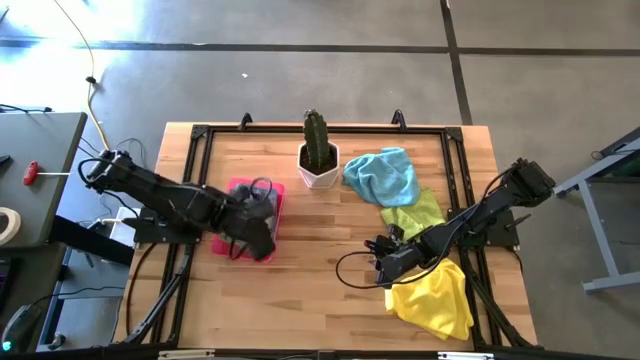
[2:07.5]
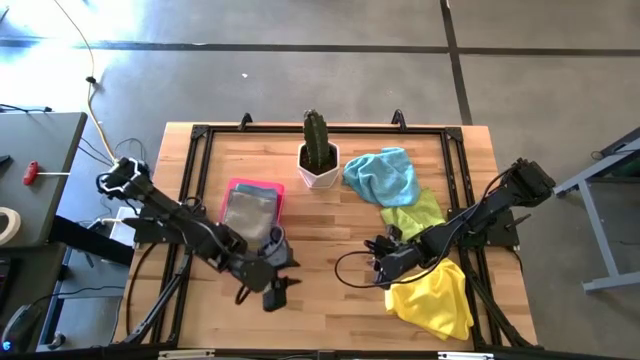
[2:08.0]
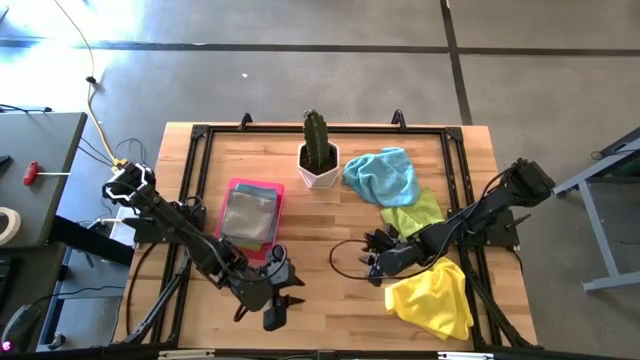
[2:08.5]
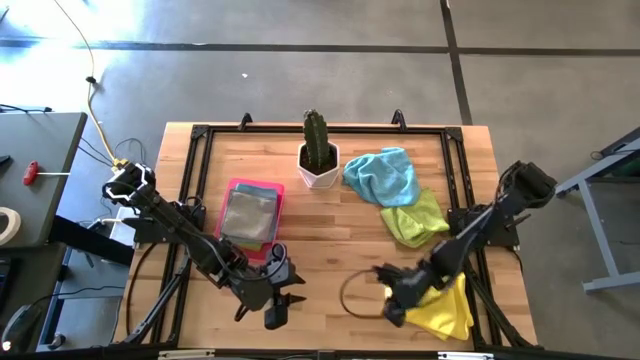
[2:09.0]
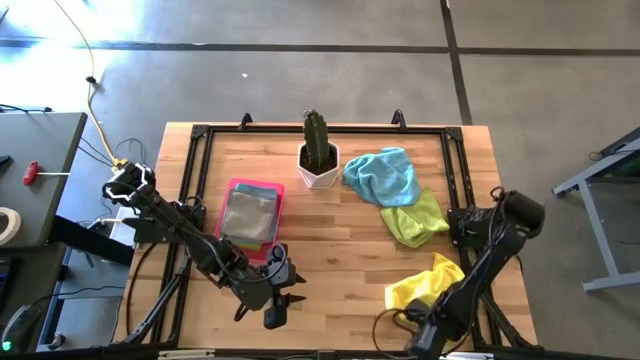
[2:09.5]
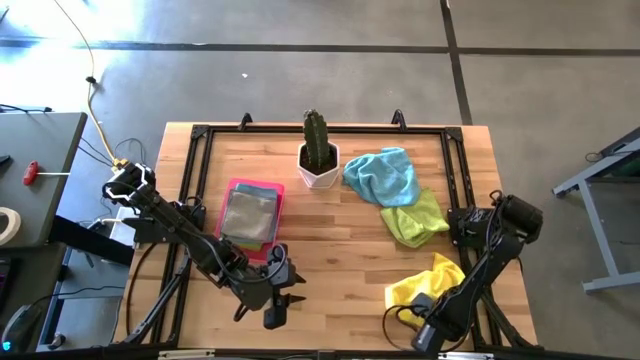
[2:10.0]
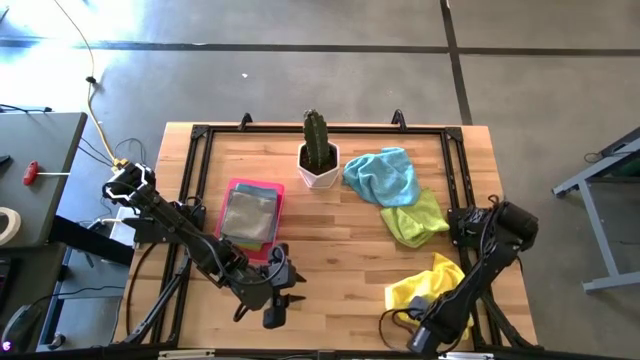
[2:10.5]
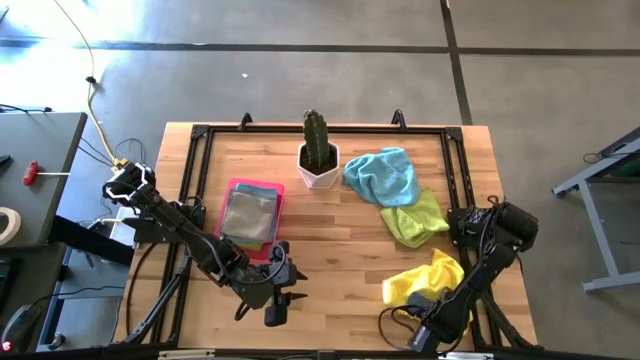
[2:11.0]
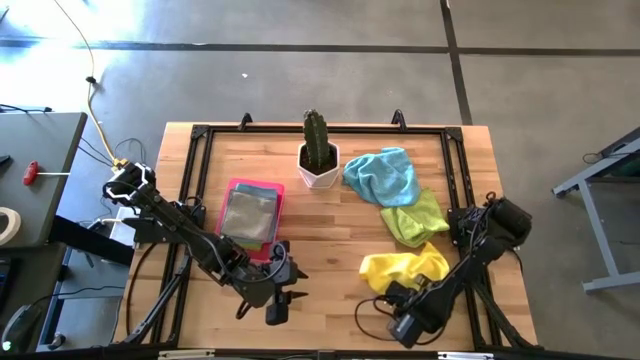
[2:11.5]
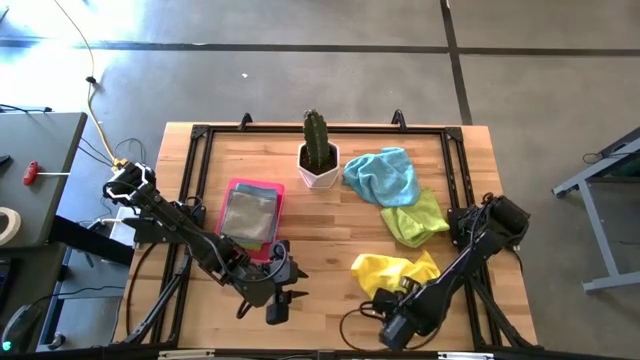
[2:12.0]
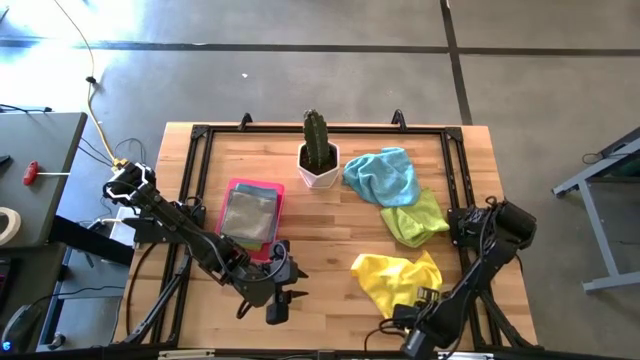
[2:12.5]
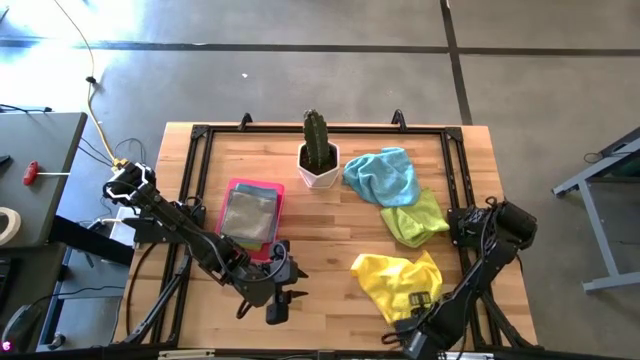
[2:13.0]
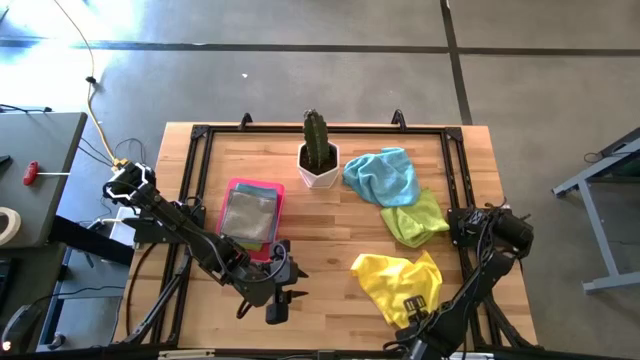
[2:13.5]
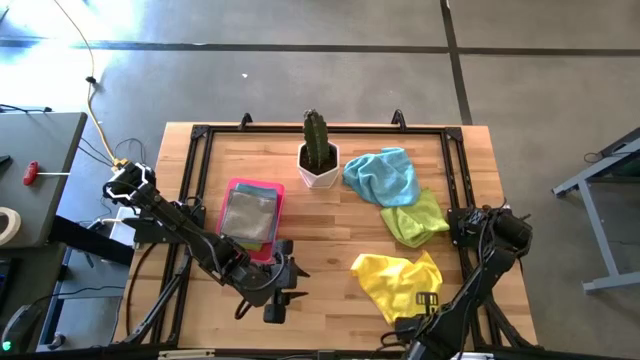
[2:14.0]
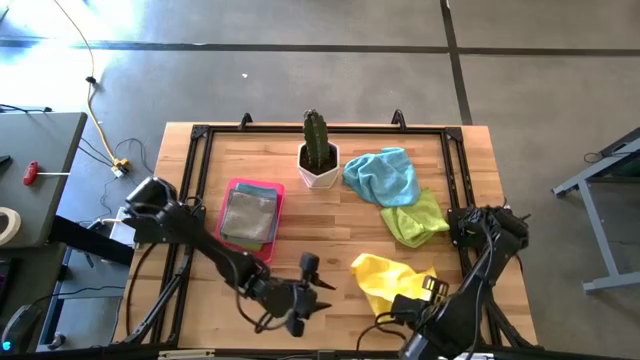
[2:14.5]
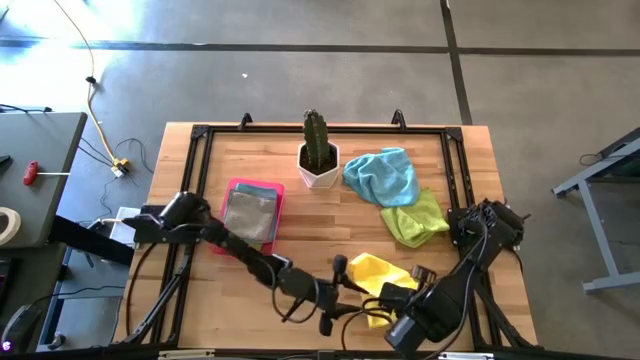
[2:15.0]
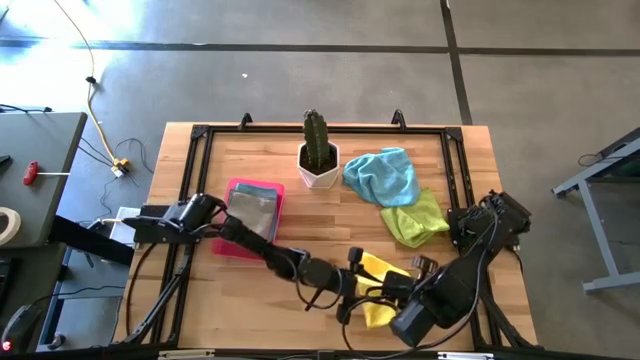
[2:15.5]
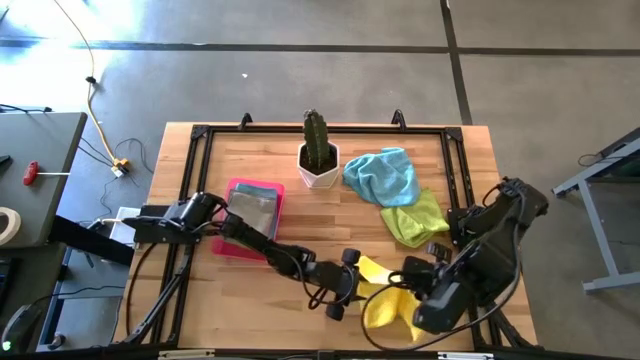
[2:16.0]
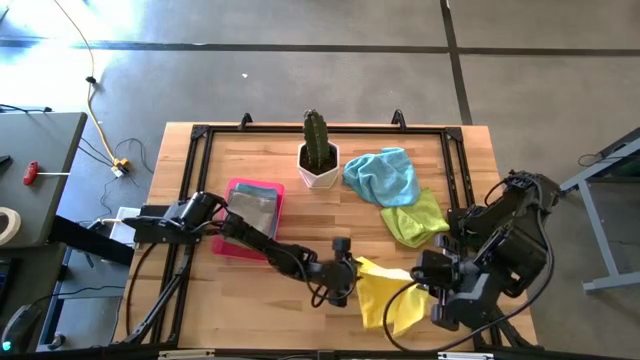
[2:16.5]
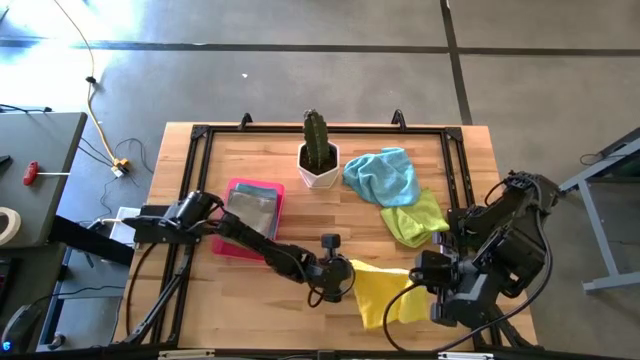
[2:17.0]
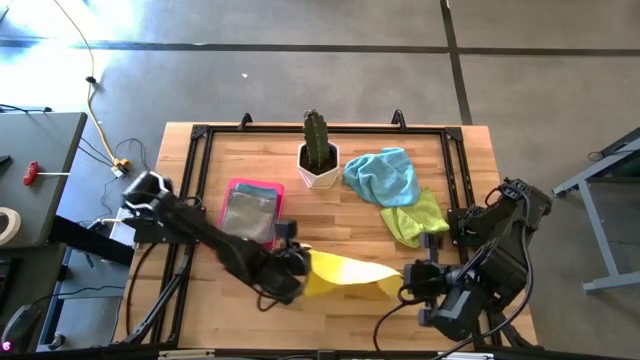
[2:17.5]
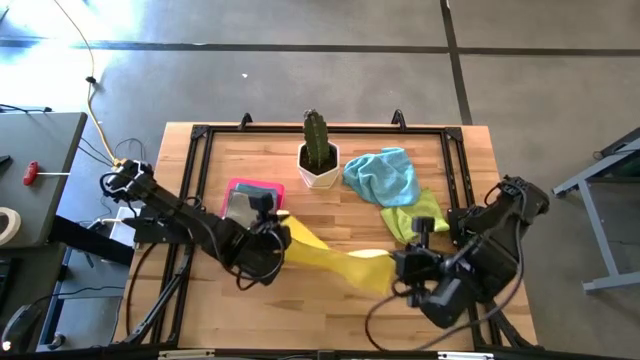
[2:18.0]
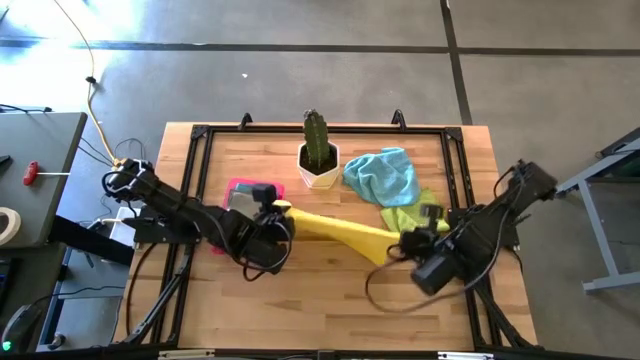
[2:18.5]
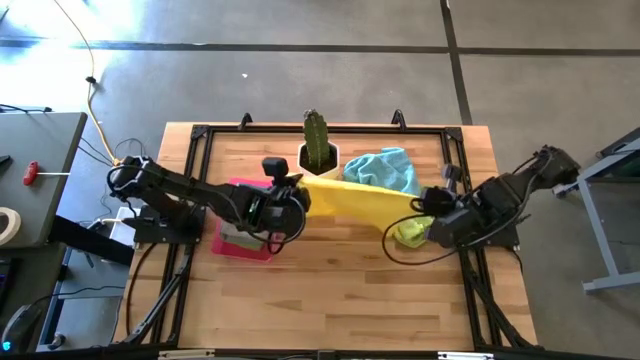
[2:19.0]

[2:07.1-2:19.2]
Task: Fold microfiber towels
Fold the yellow towel

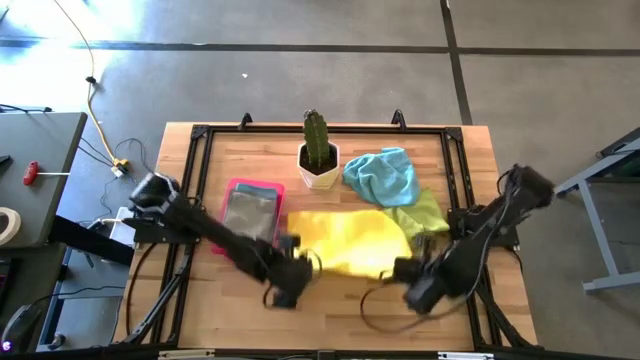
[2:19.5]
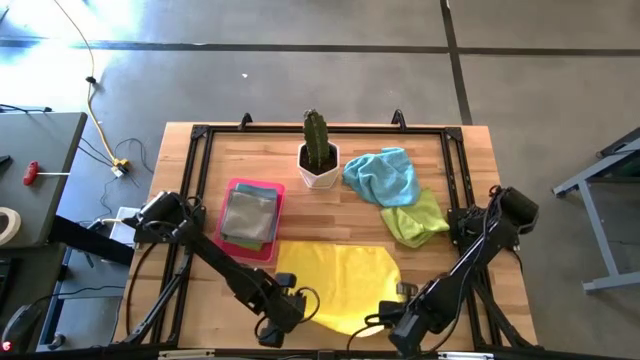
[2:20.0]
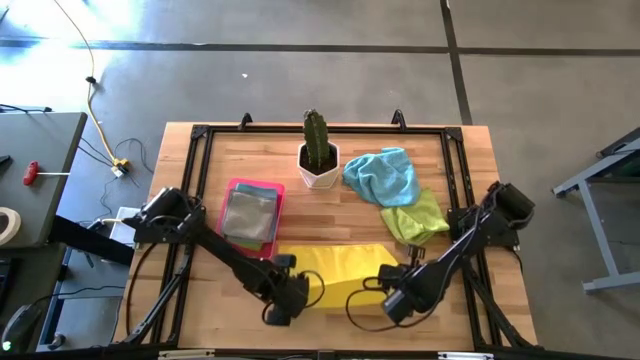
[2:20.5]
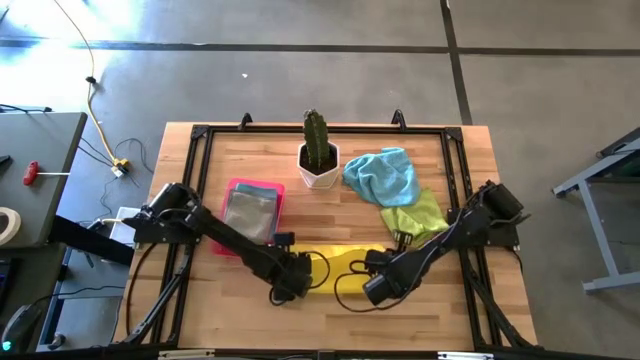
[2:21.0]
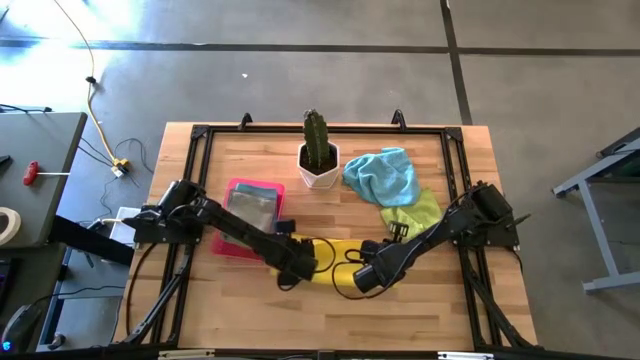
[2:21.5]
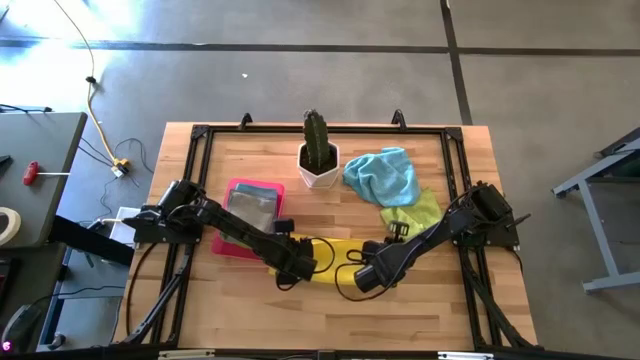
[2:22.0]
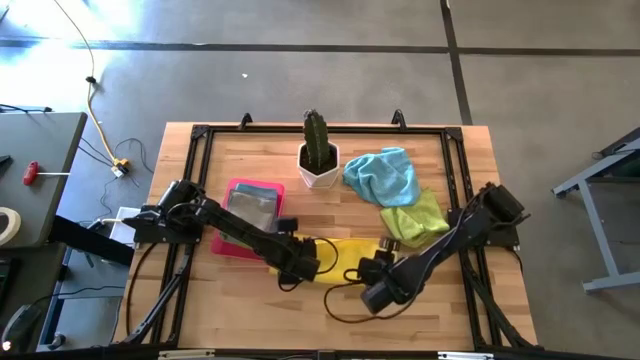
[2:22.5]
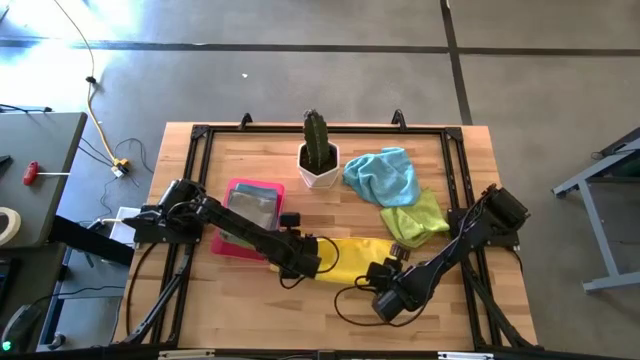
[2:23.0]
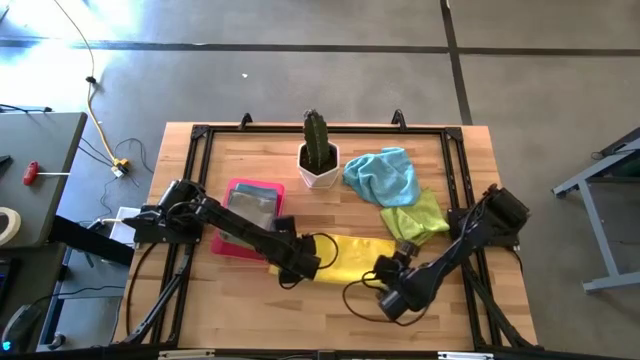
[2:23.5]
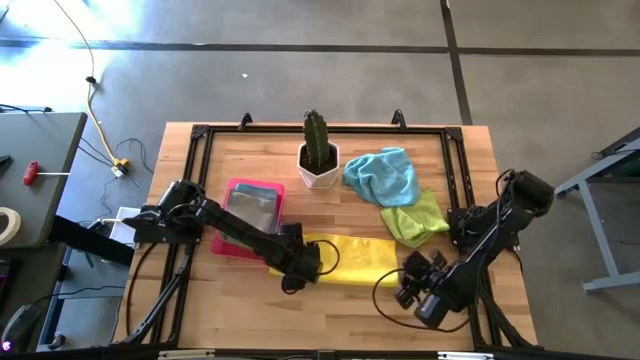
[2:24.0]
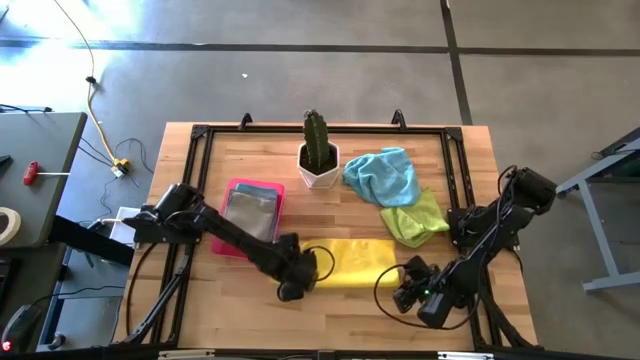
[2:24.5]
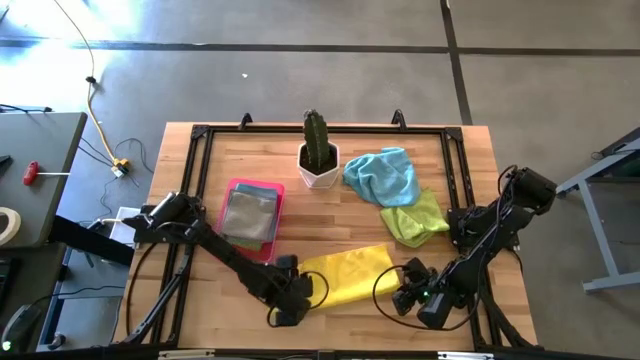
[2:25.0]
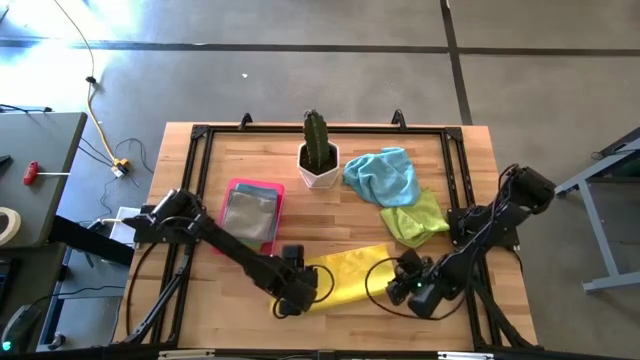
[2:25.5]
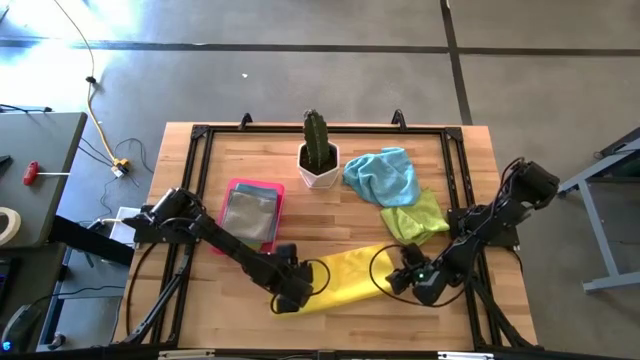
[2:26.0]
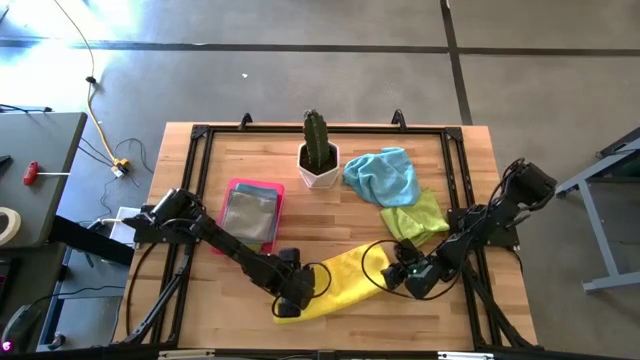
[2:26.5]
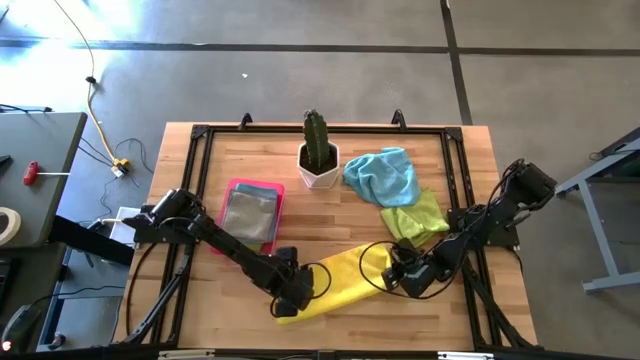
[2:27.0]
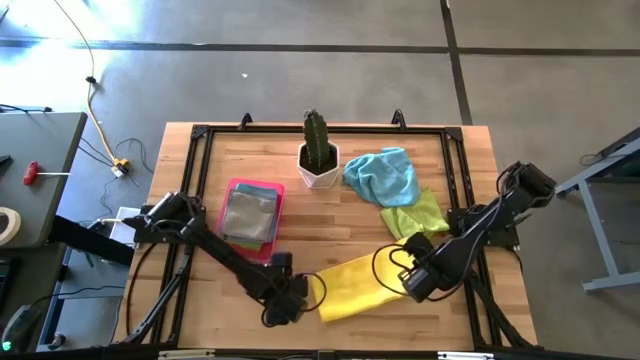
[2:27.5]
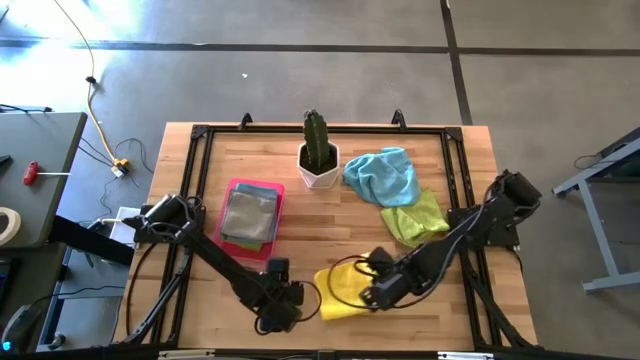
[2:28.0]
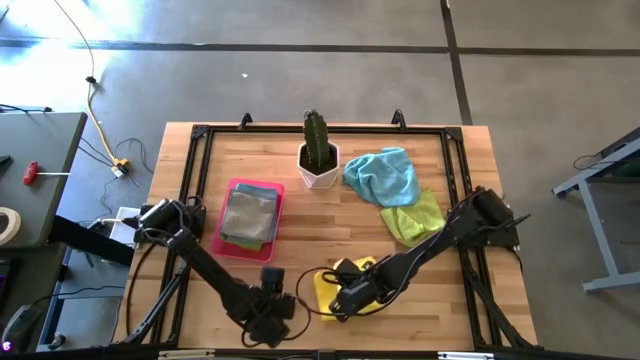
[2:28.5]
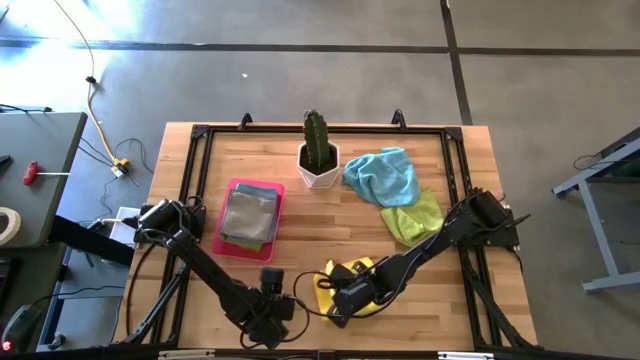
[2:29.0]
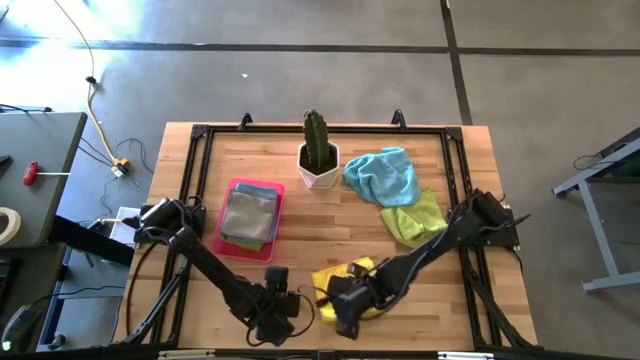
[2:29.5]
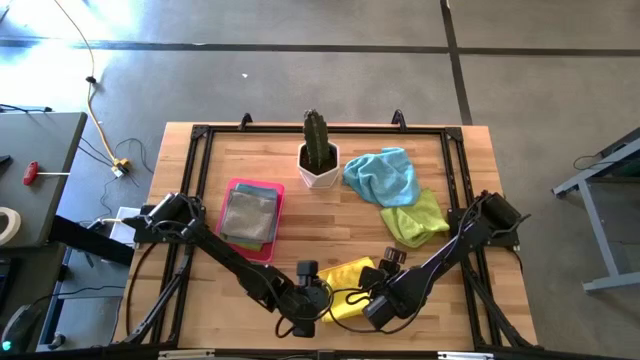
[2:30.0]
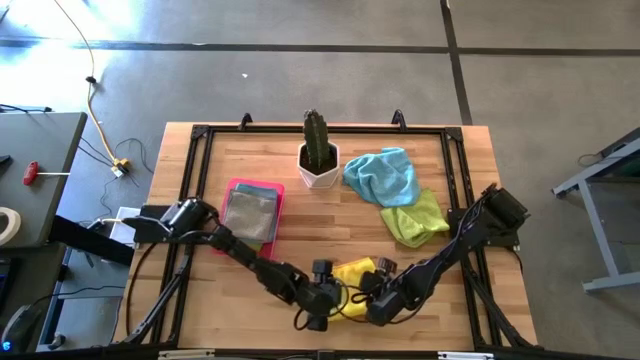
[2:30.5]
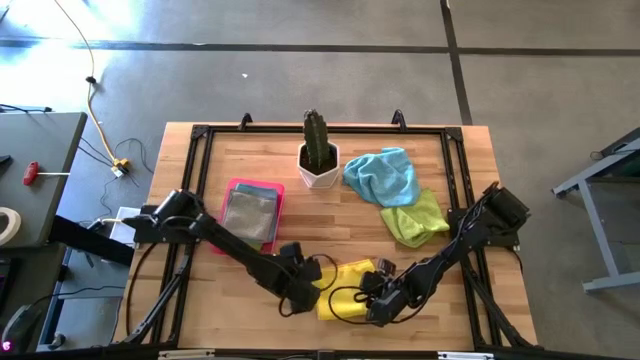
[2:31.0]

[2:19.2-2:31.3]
Fold the yellow towel
